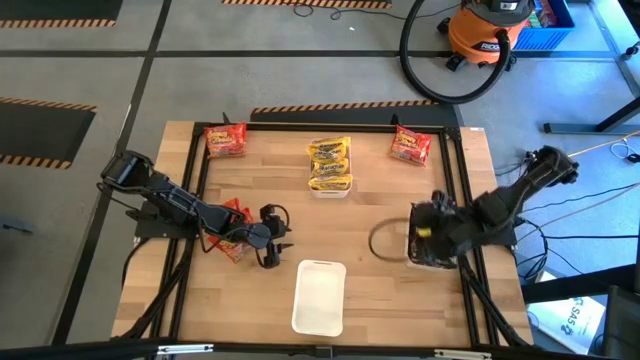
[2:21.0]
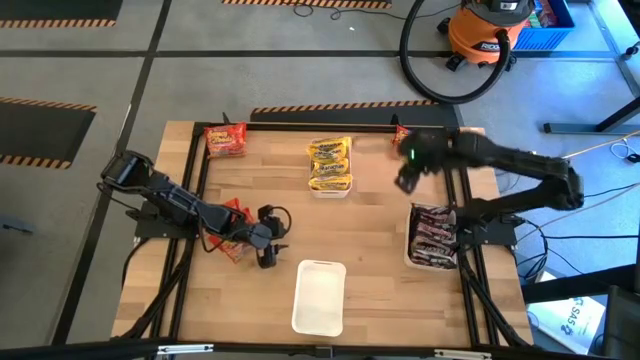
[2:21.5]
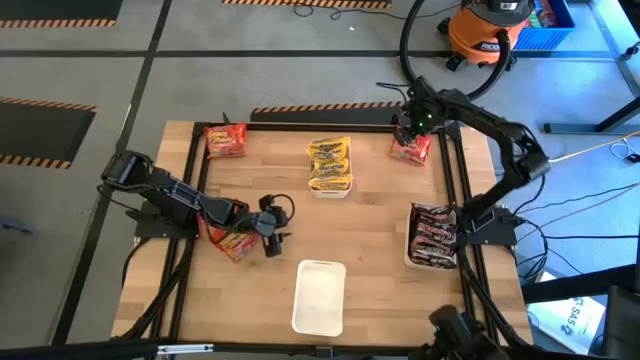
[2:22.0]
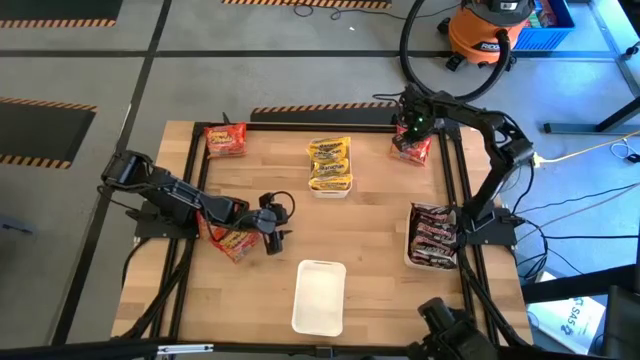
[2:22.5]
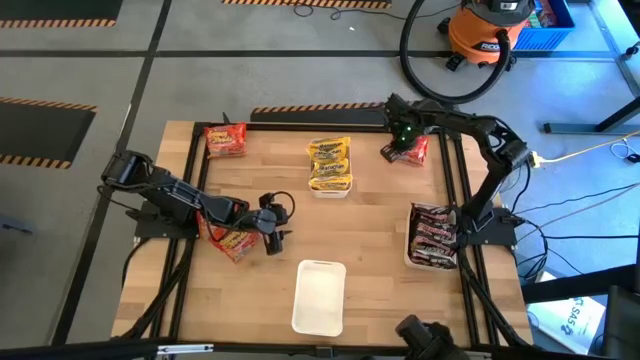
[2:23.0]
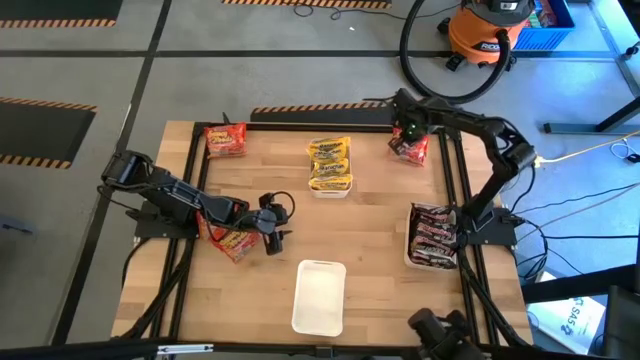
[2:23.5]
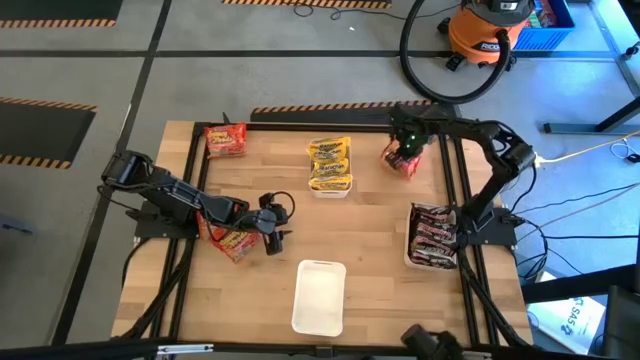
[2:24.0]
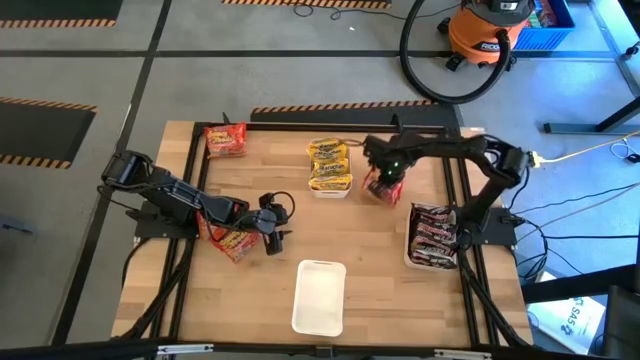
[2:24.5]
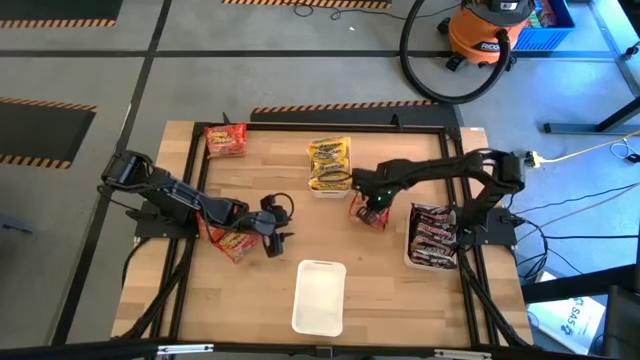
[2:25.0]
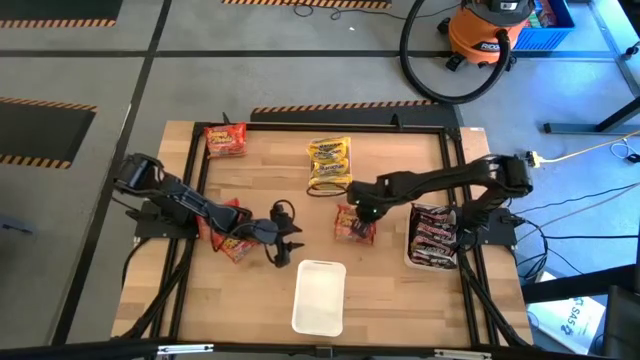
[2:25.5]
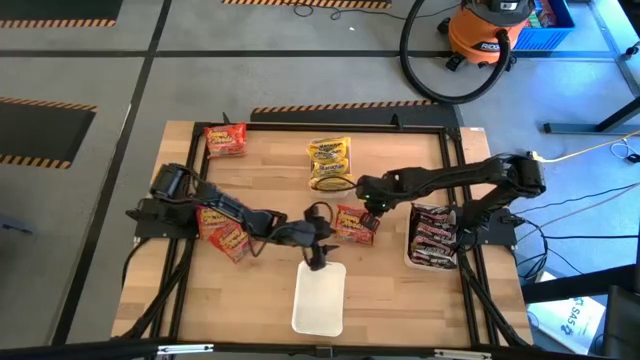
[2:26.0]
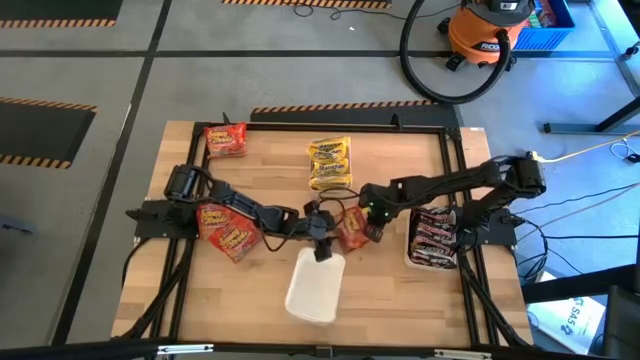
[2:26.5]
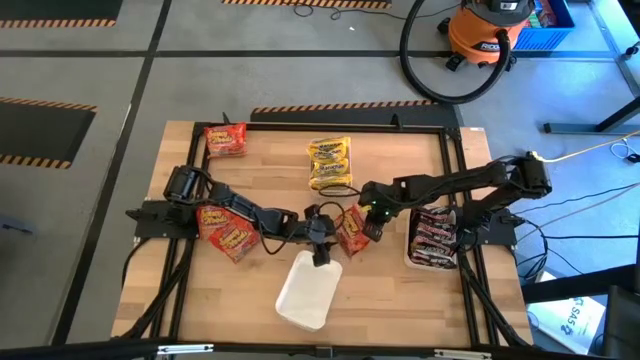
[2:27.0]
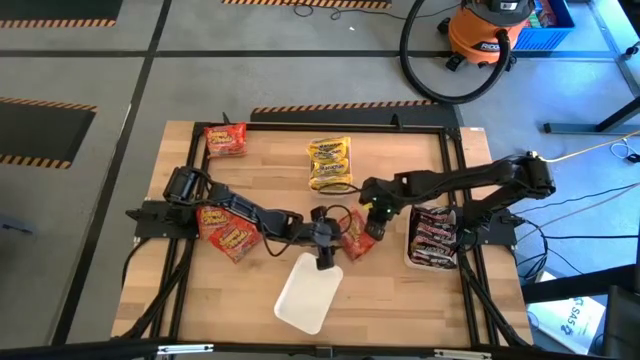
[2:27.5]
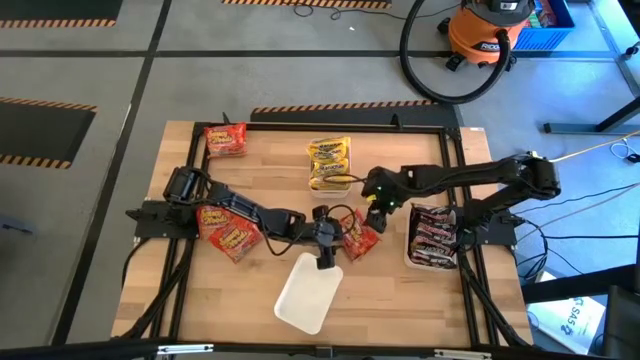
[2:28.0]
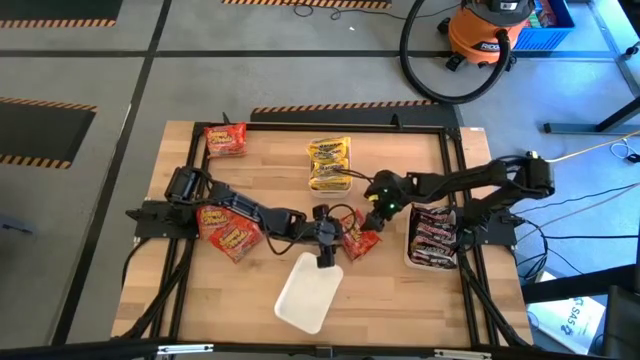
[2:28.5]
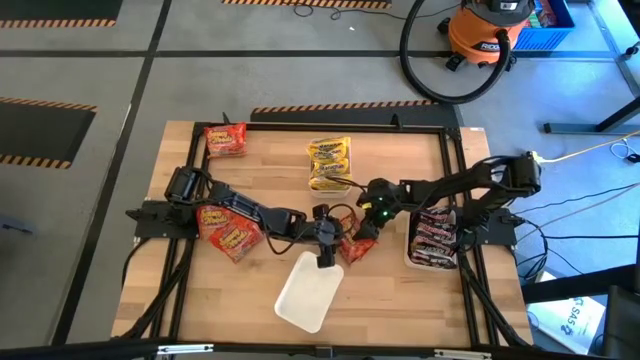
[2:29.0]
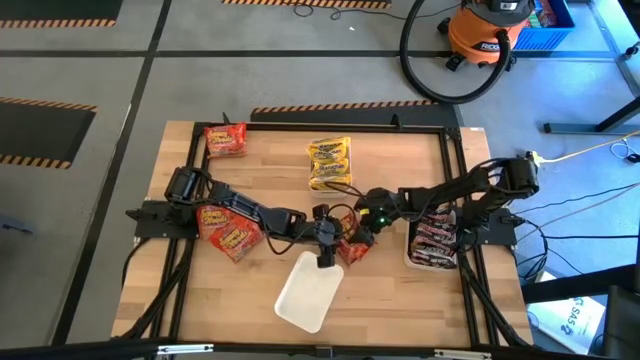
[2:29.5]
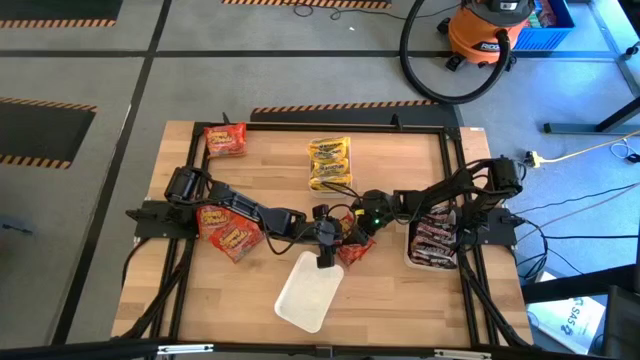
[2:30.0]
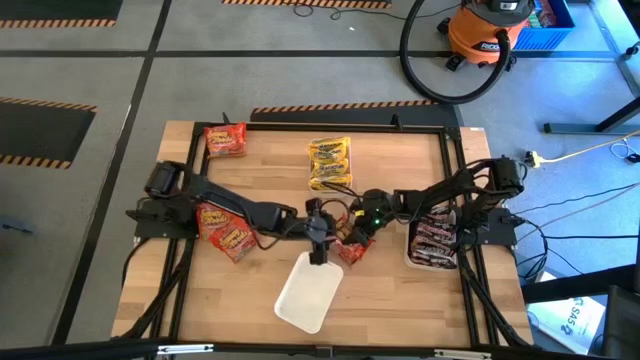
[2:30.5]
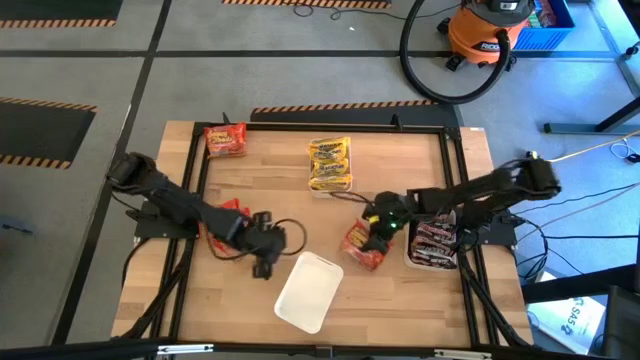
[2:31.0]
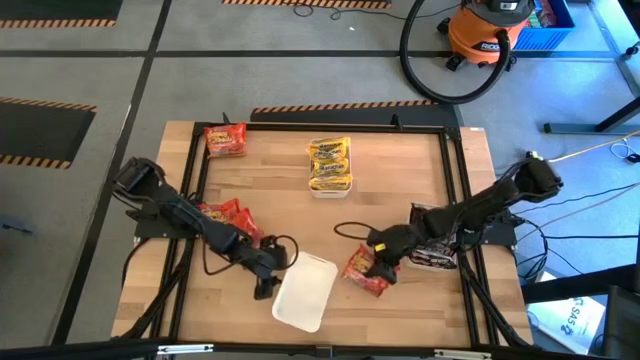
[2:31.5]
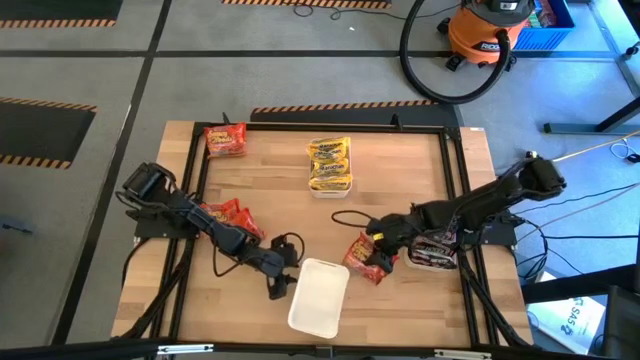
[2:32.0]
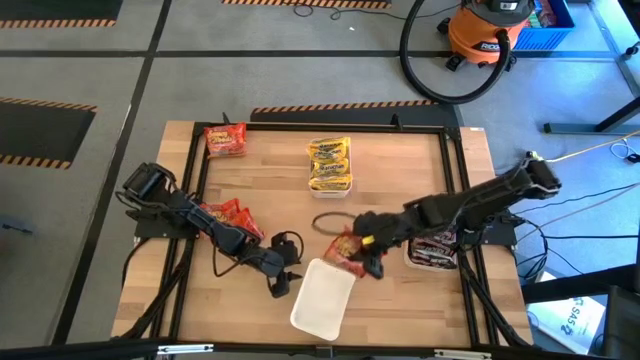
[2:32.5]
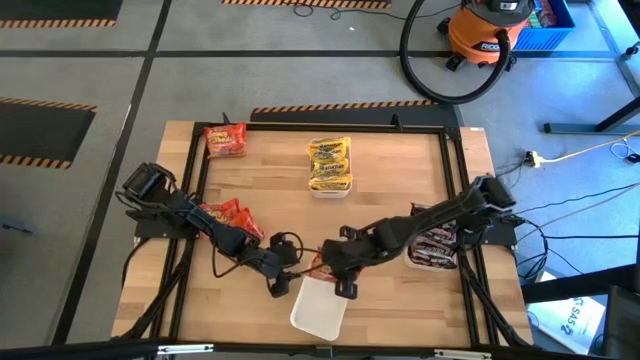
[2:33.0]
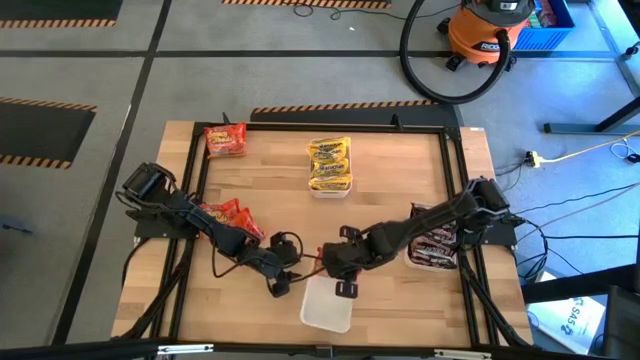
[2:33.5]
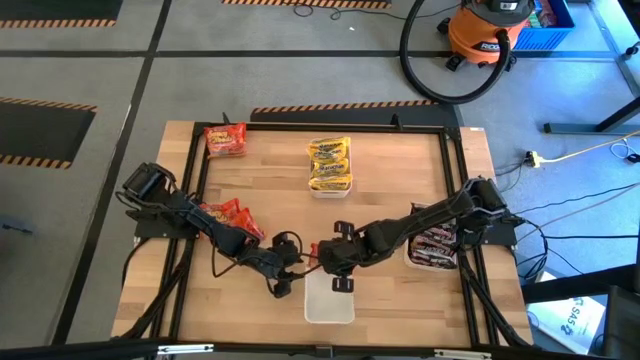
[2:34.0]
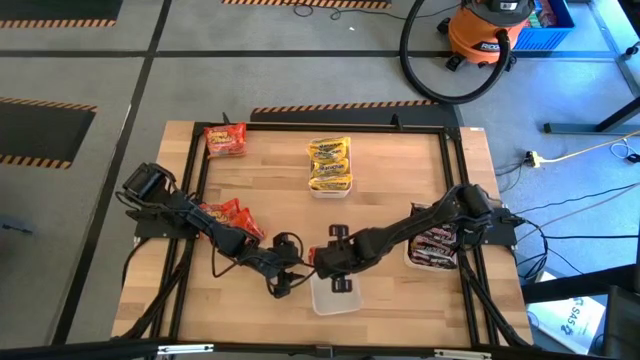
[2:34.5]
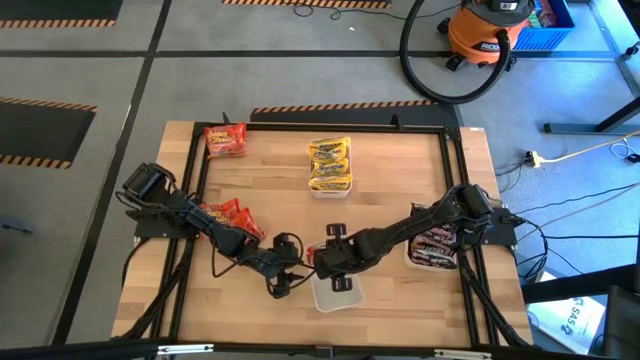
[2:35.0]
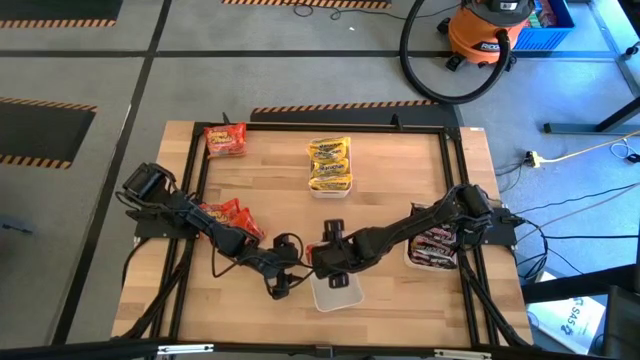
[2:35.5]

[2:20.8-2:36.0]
Task: Sort Maruchan noodles
Put the top right orange noodle pack into the bottom white bin

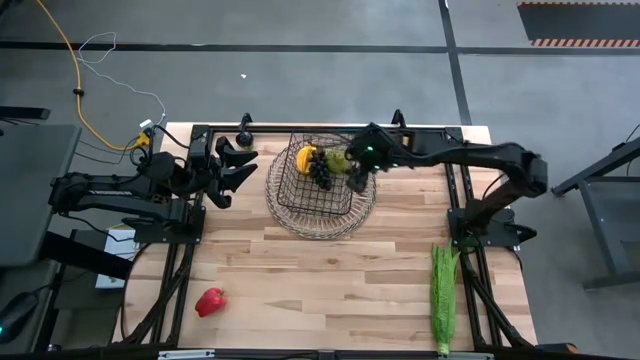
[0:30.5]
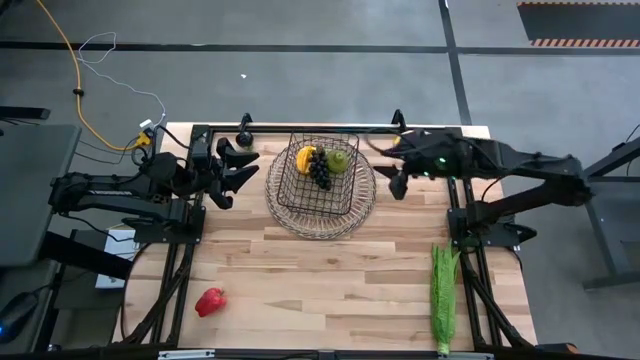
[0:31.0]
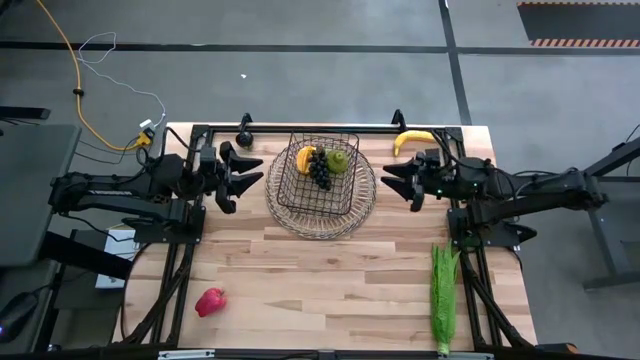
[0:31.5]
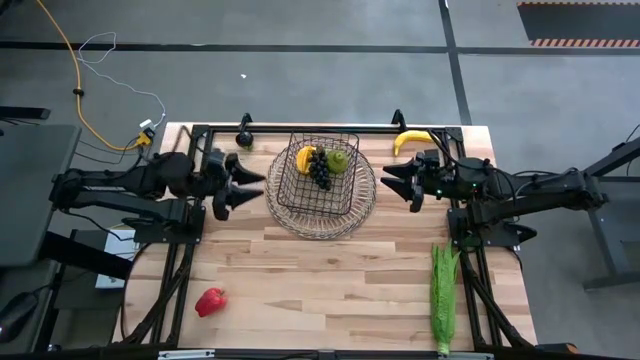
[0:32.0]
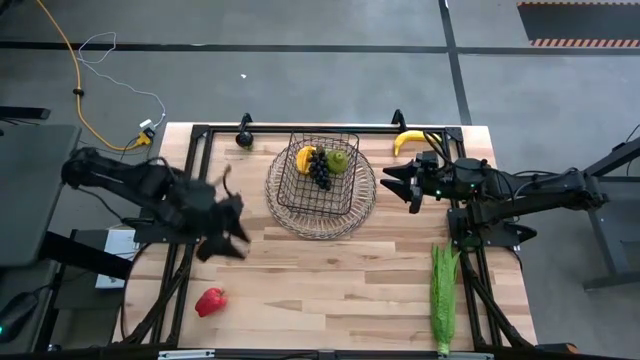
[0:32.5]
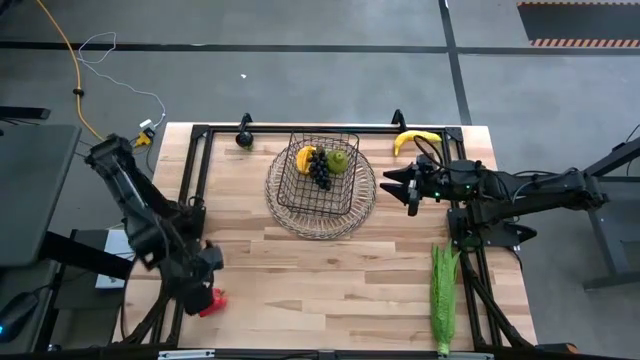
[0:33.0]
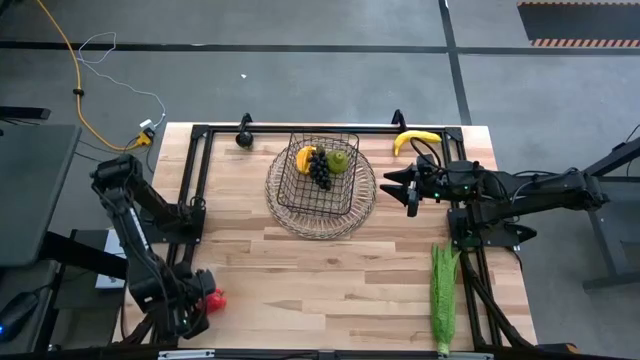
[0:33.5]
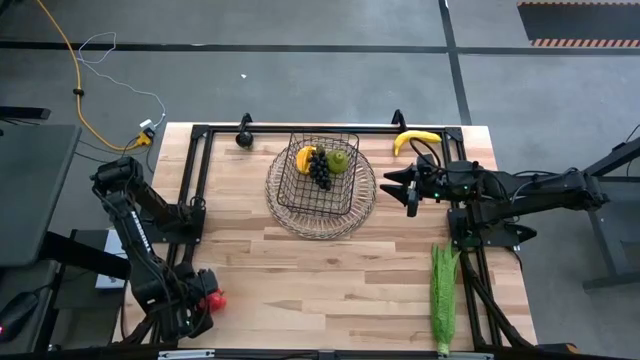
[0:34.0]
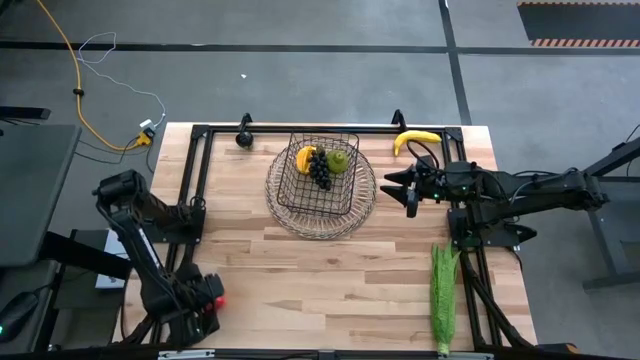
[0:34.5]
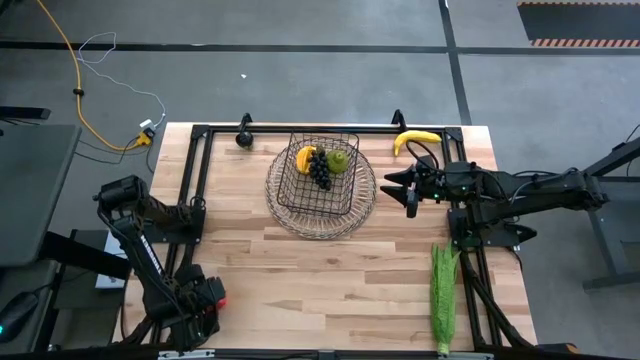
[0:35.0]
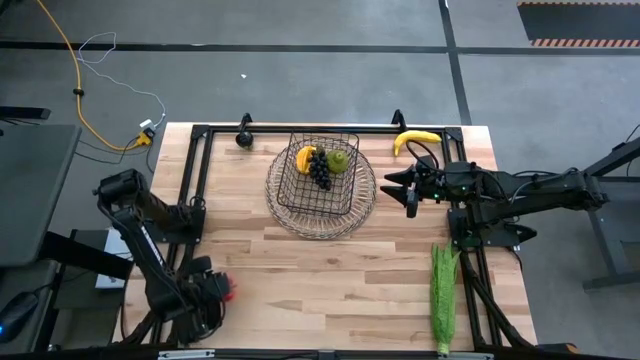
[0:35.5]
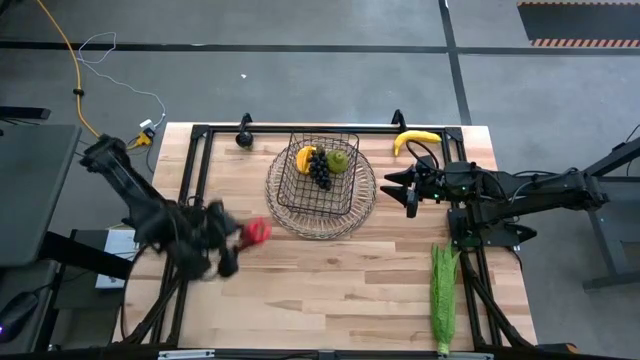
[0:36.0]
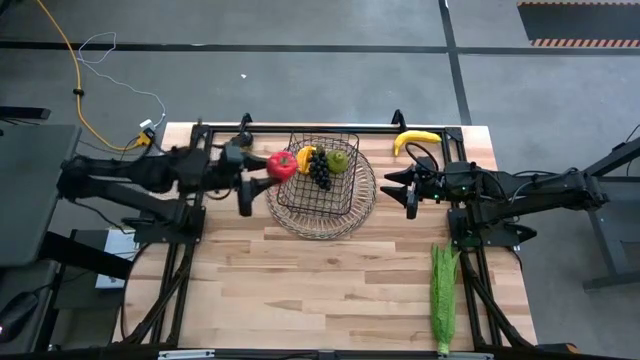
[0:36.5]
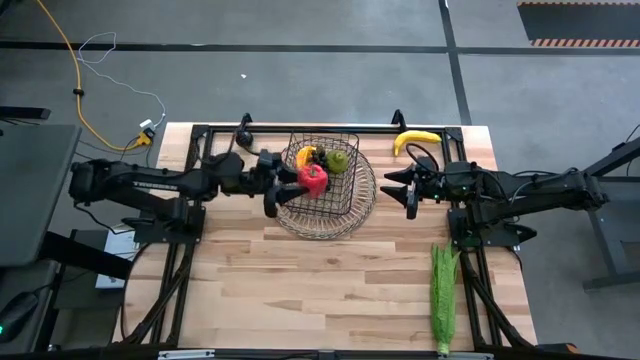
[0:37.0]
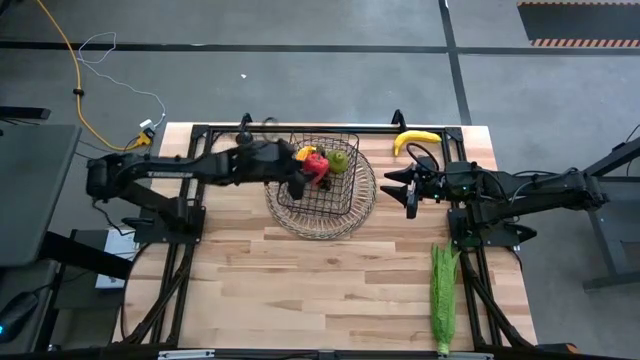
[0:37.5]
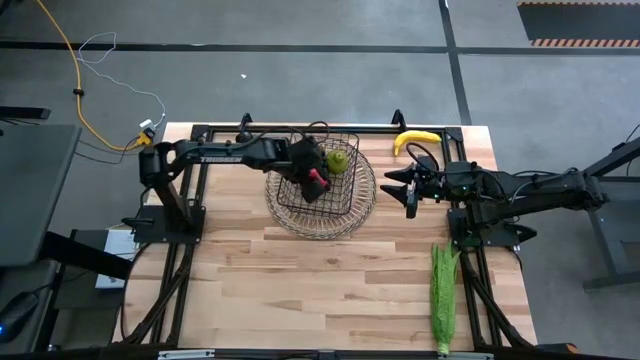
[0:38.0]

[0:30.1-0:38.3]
Task: Build produce basket
Put the bell pepper into the wire basket
